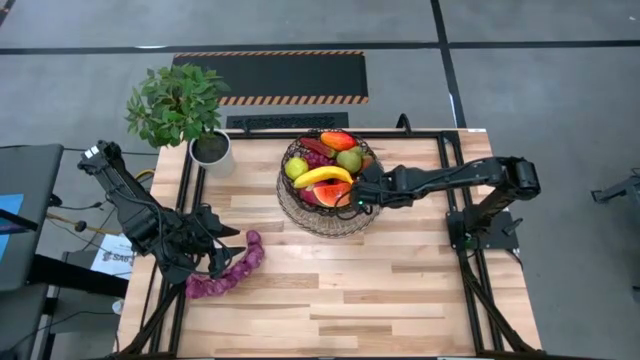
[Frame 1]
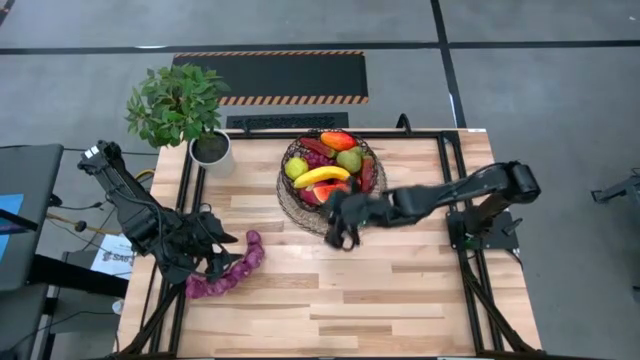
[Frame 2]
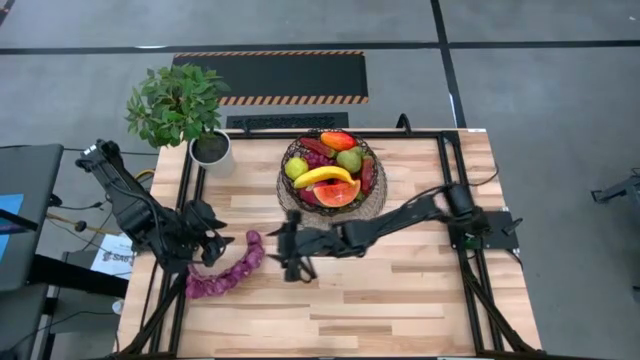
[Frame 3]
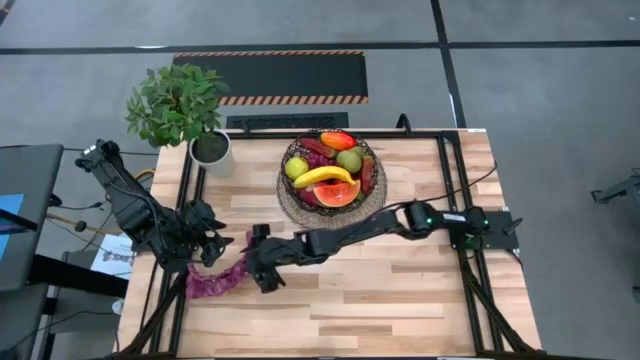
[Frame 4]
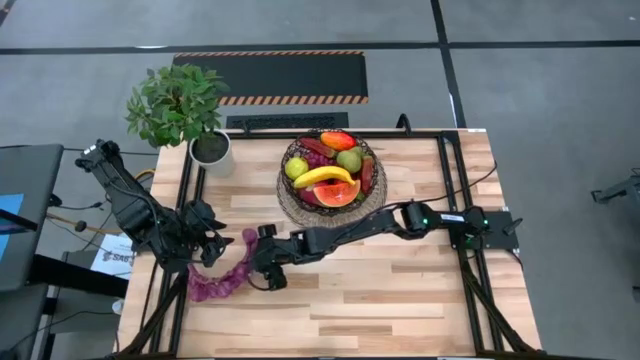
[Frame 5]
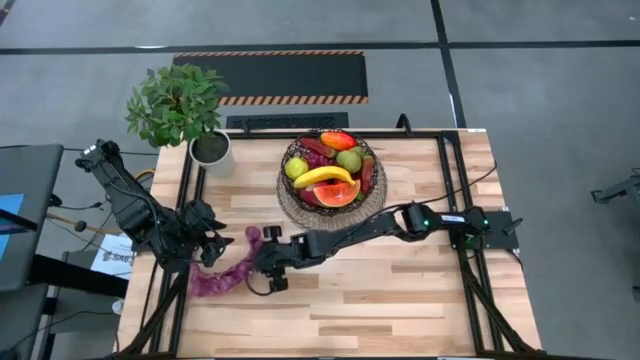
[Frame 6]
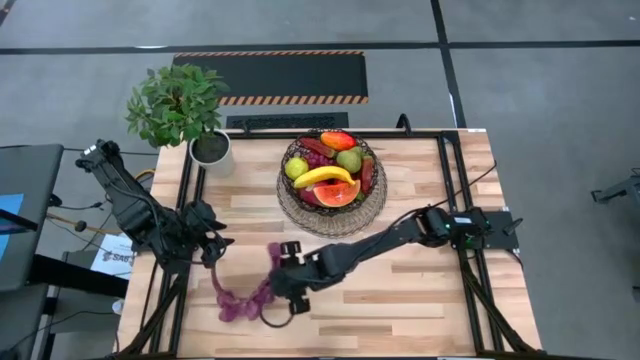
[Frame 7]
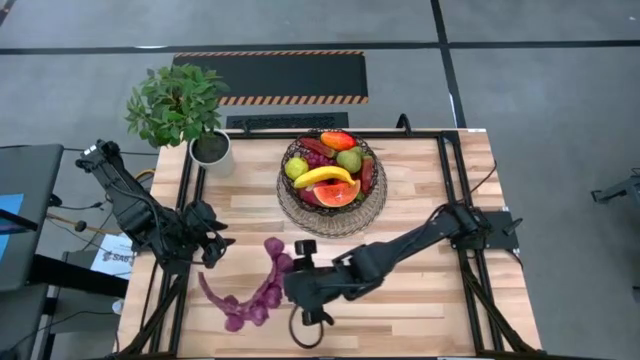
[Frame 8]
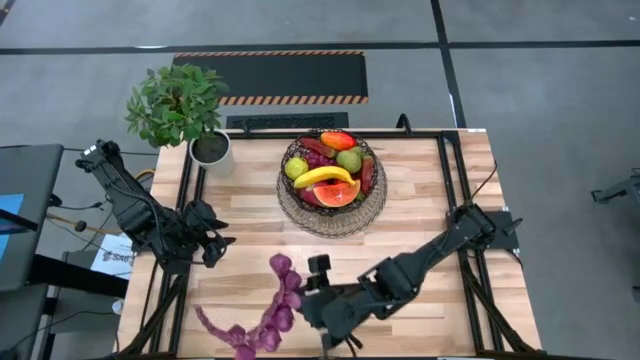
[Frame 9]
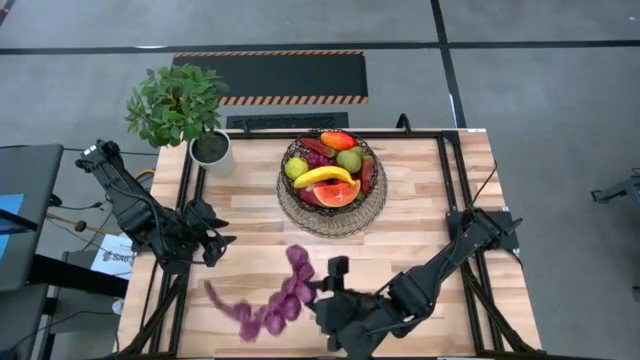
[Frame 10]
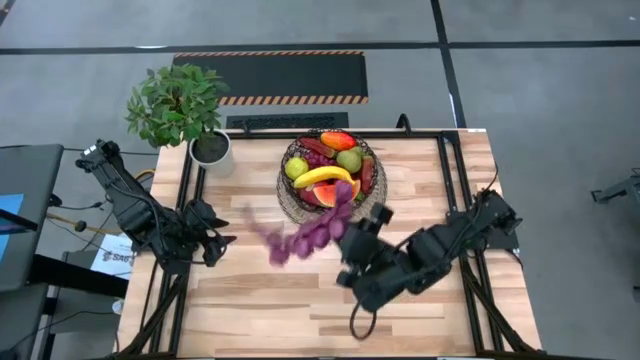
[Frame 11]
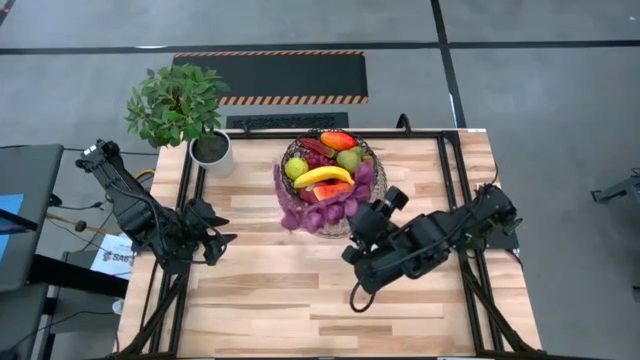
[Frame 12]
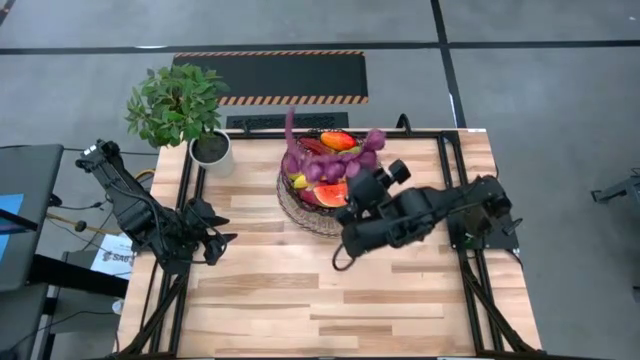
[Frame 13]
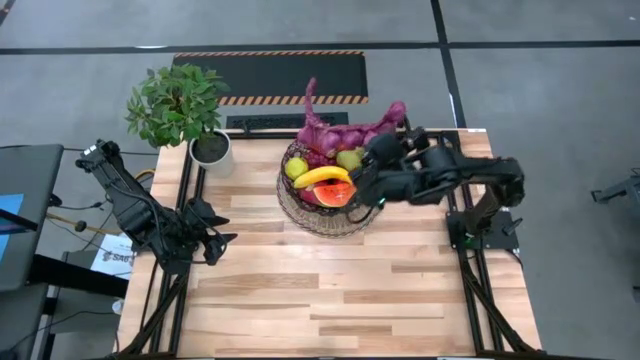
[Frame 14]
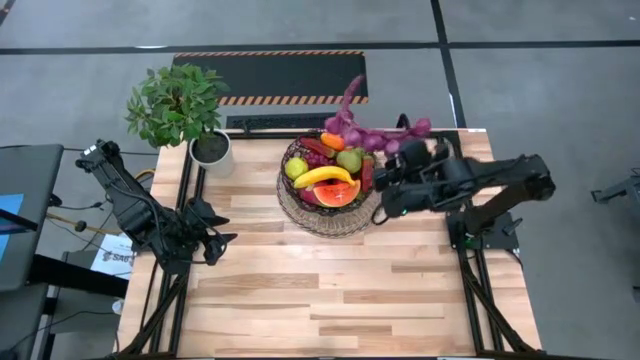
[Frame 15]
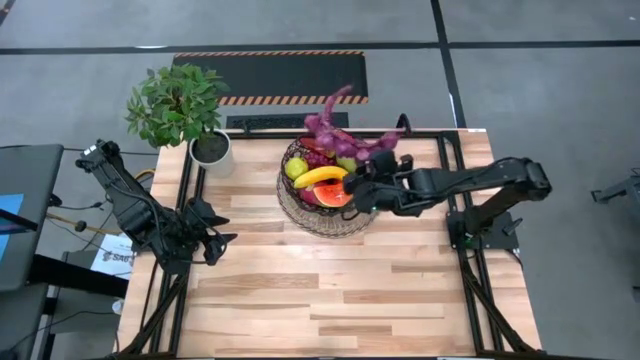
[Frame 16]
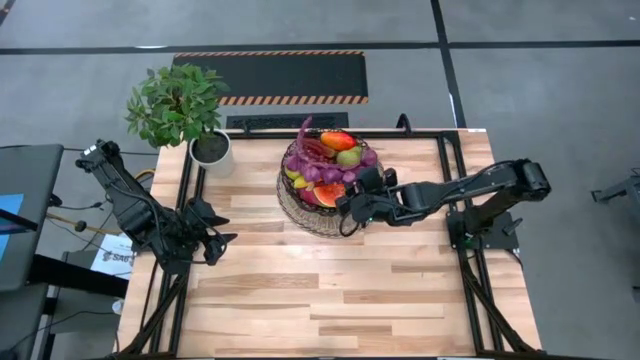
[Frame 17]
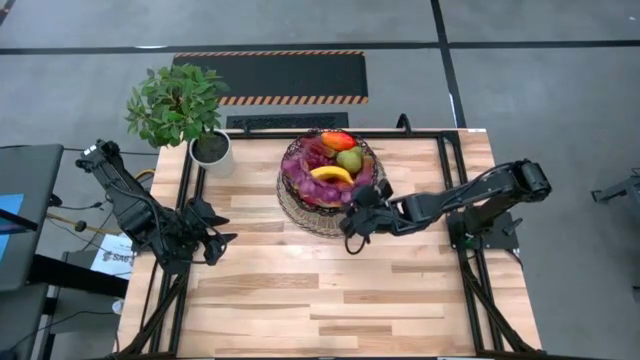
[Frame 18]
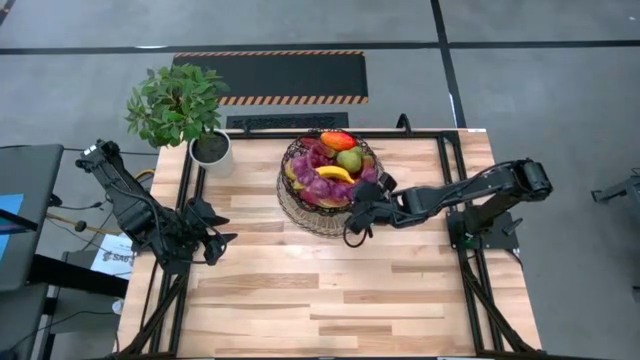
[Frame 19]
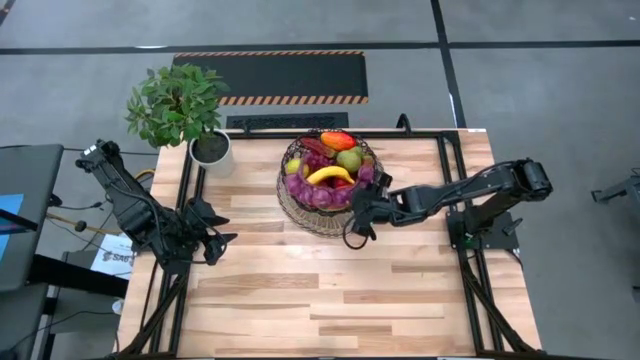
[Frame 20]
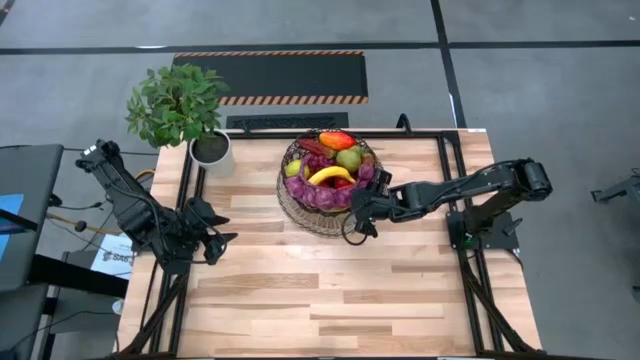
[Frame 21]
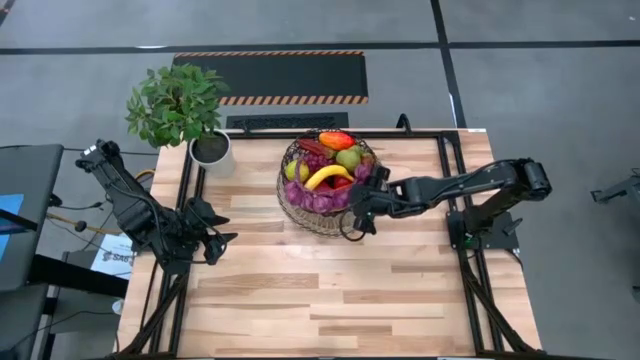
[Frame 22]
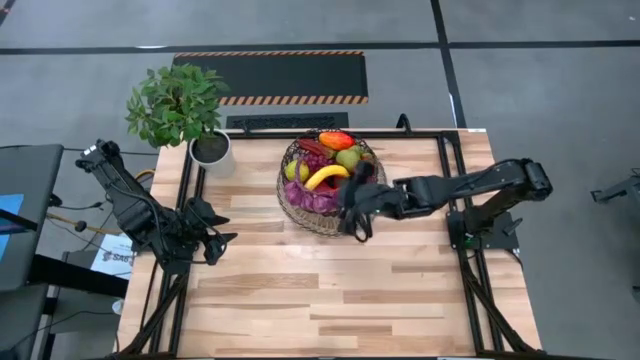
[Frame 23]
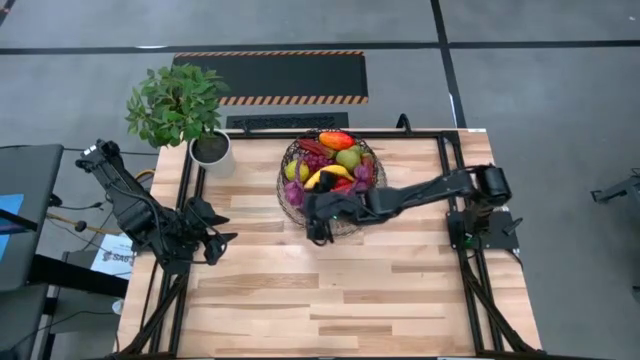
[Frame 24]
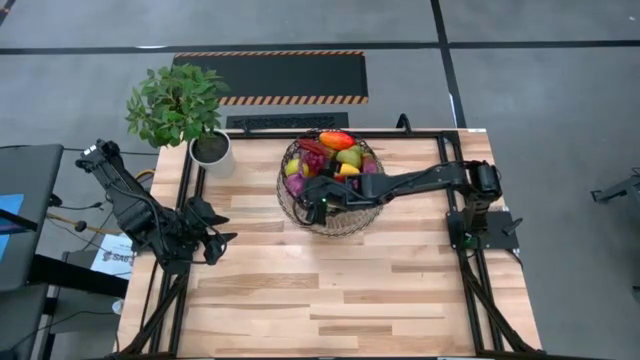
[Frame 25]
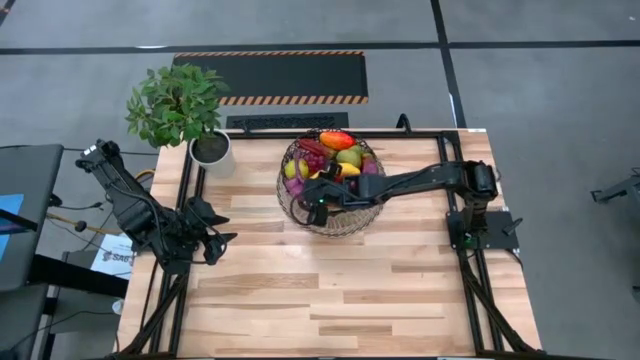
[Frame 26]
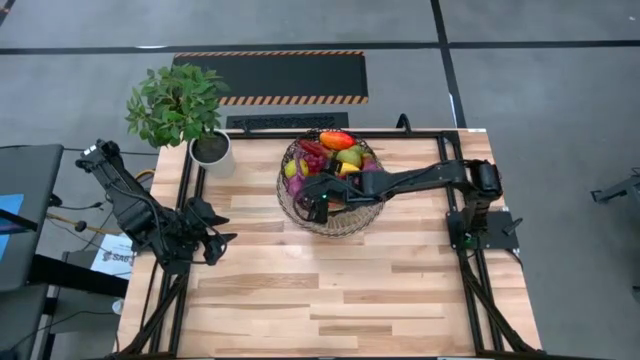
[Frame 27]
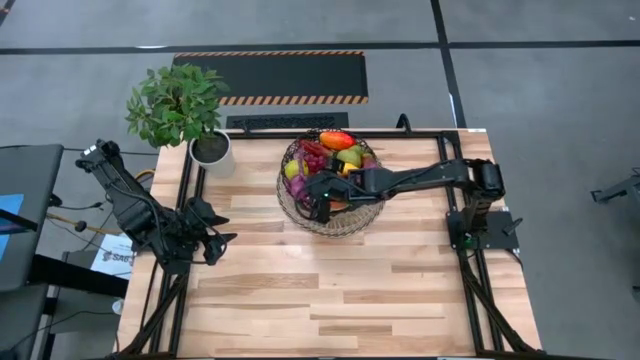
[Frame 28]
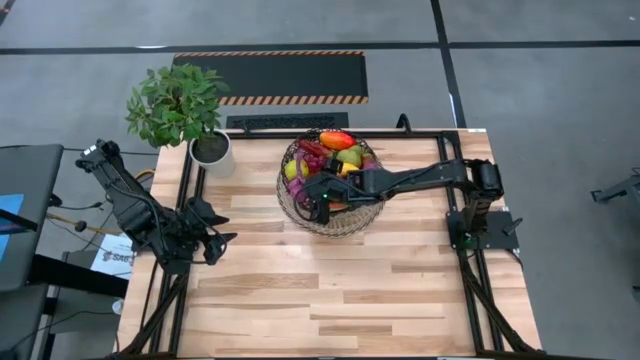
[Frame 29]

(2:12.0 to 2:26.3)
Task: Build produce basket
Put the purple garlic into the basket

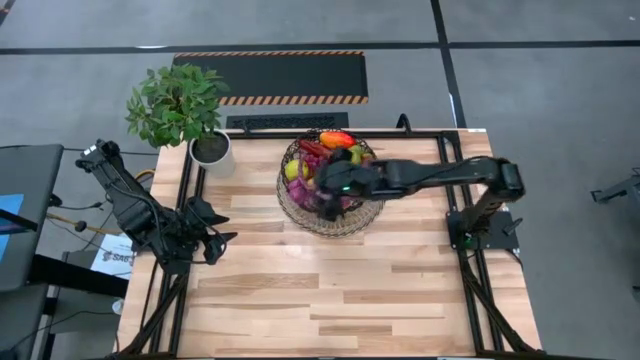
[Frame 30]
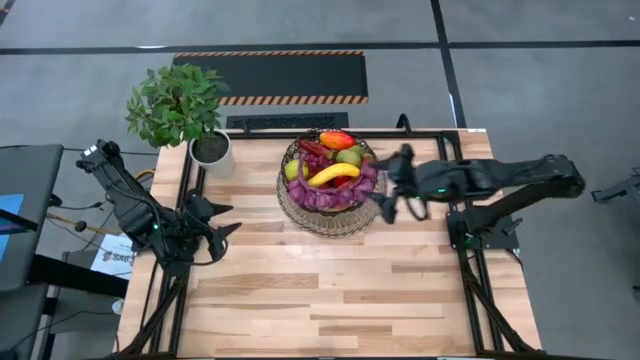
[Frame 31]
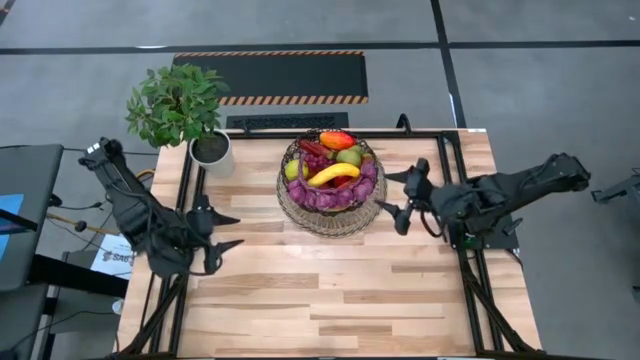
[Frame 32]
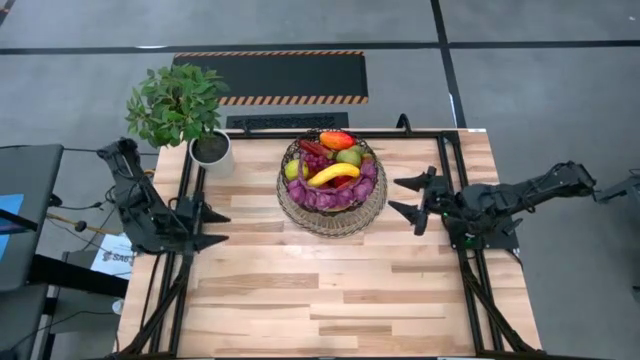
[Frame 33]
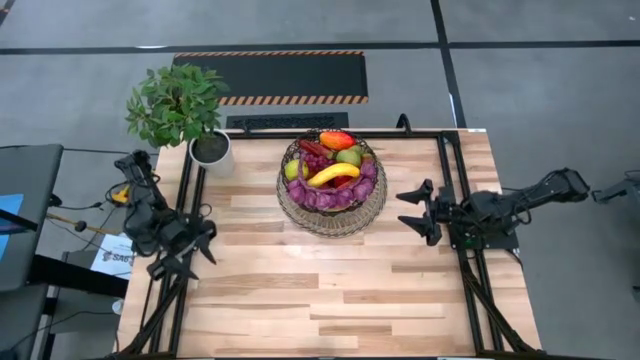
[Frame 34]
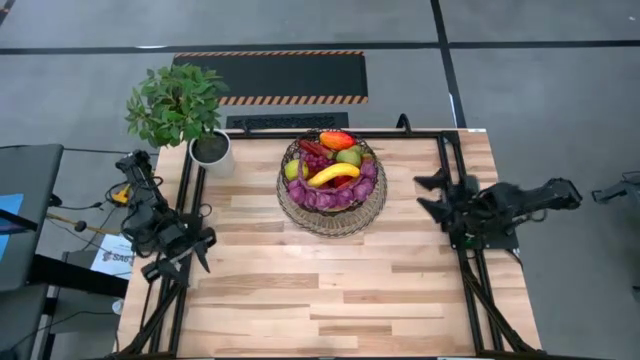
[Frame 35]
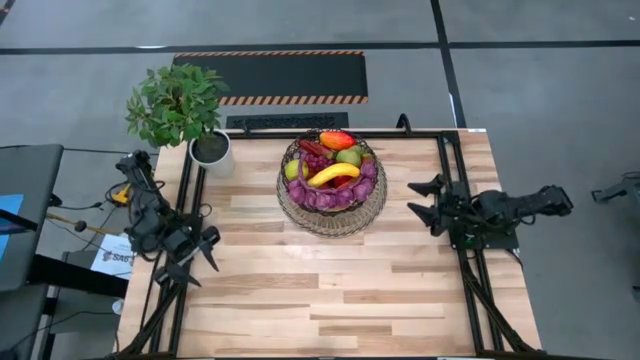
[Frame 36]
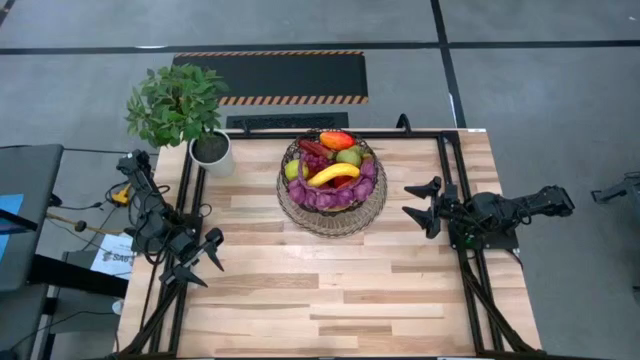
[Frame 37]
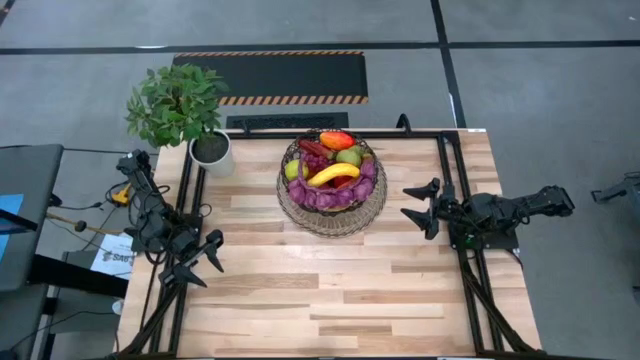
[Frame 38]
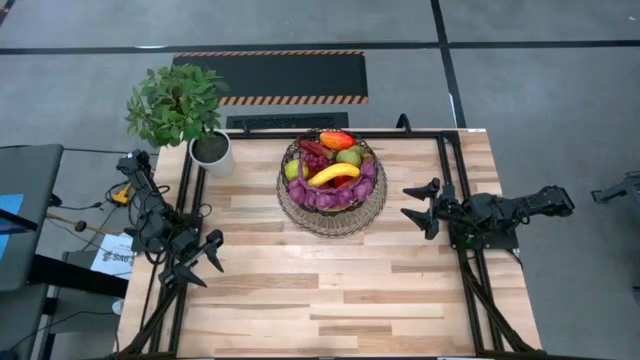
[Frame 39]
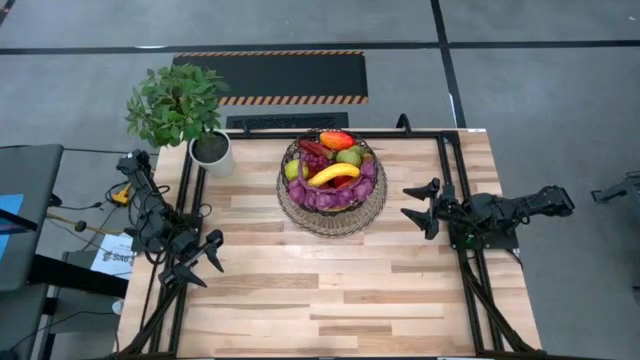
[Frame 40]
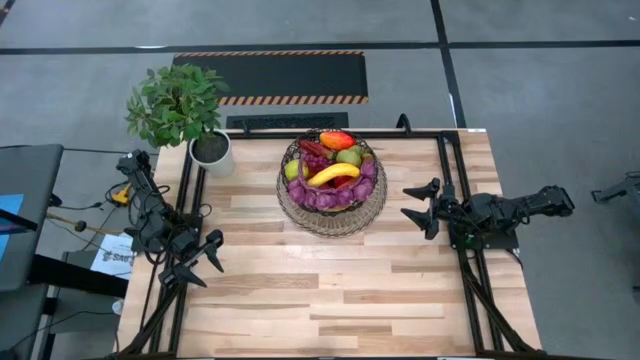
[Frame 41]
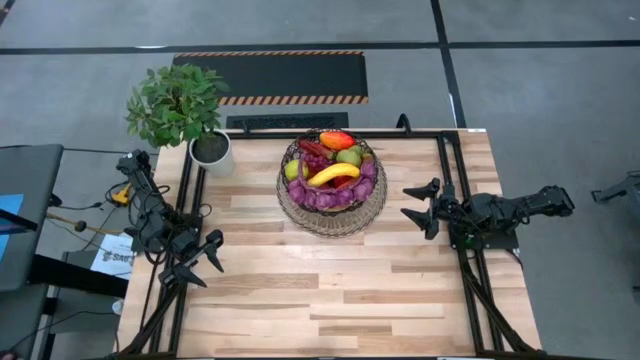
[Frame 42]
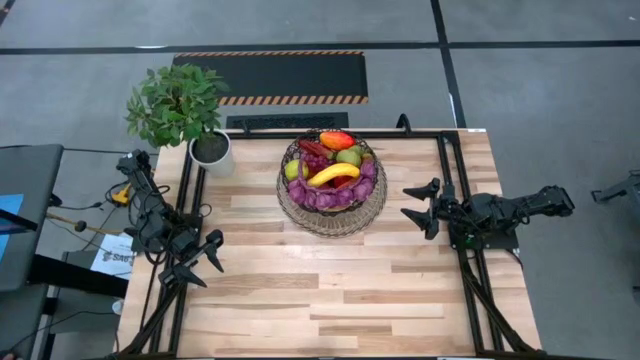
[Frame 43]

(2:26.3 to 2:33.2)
Return to Home Position
